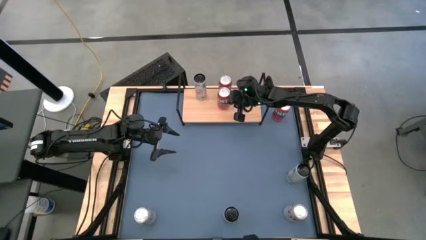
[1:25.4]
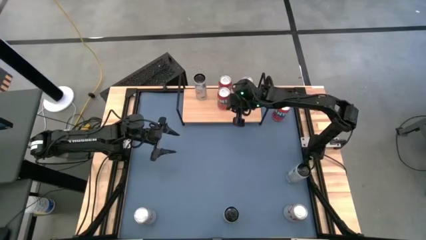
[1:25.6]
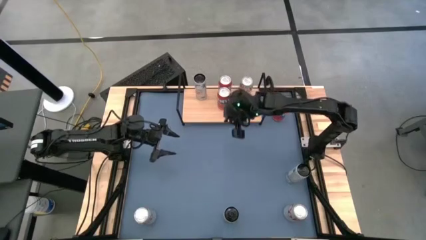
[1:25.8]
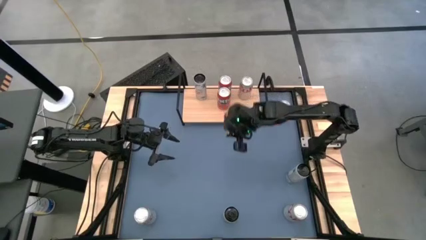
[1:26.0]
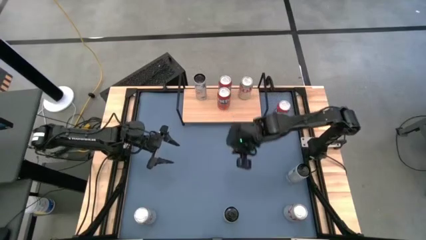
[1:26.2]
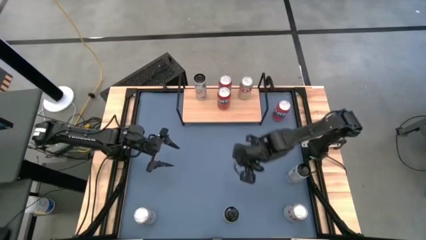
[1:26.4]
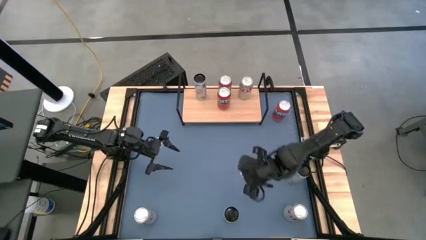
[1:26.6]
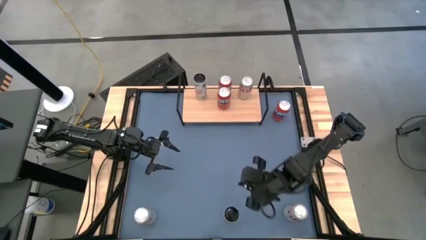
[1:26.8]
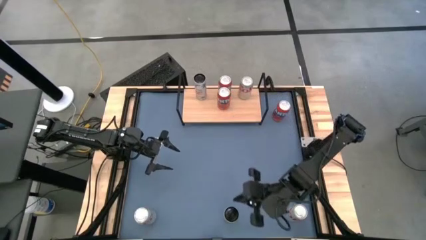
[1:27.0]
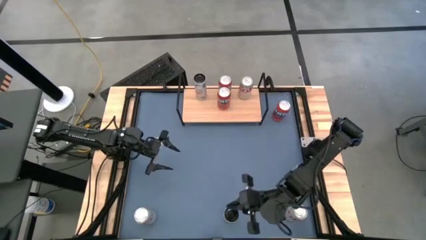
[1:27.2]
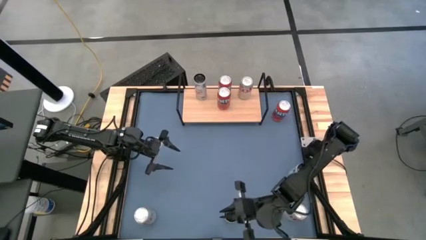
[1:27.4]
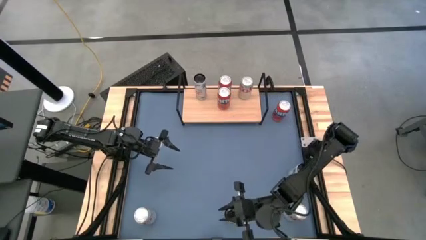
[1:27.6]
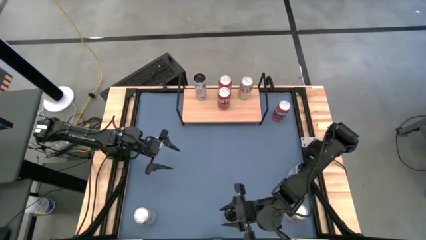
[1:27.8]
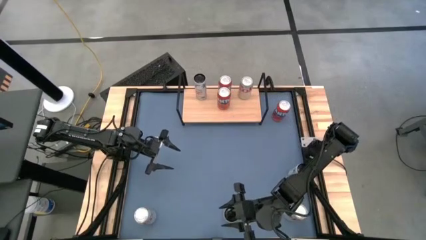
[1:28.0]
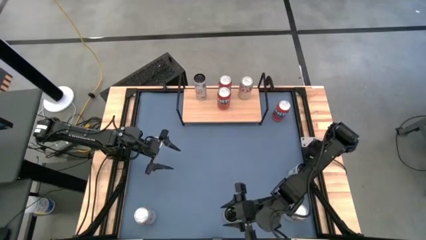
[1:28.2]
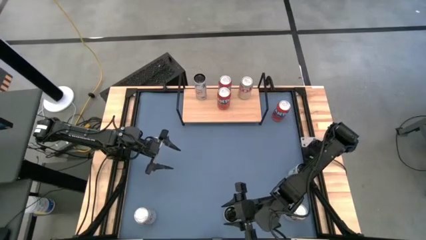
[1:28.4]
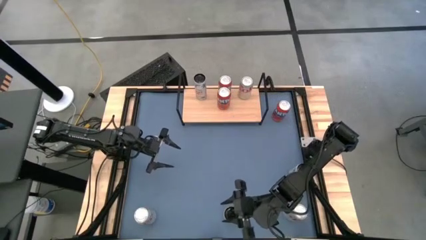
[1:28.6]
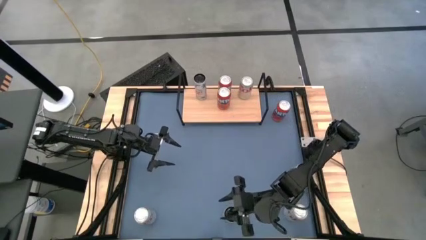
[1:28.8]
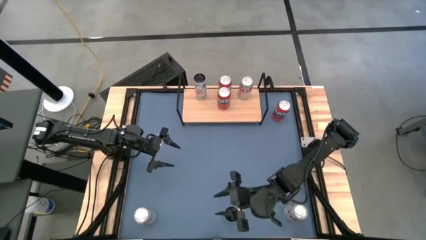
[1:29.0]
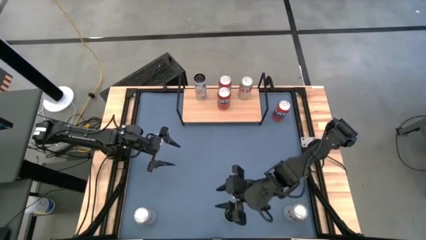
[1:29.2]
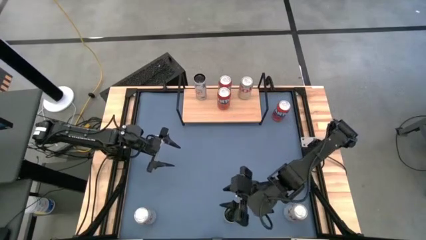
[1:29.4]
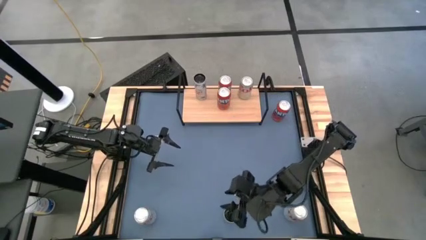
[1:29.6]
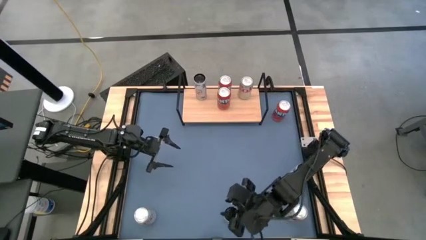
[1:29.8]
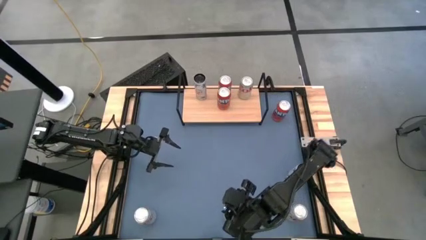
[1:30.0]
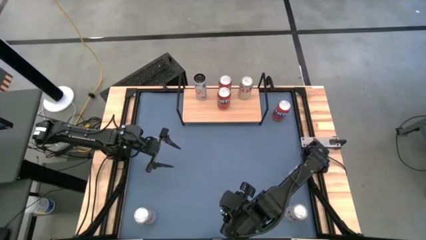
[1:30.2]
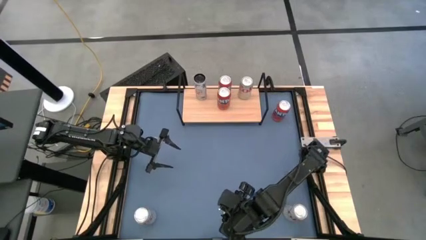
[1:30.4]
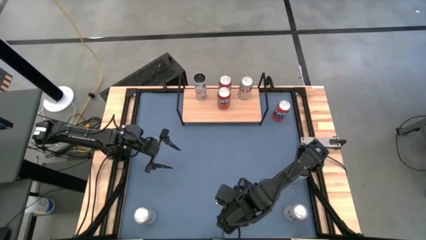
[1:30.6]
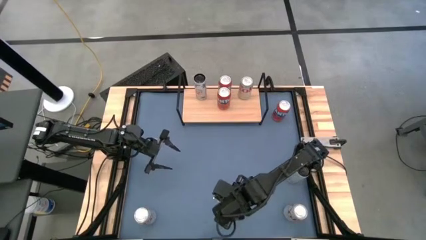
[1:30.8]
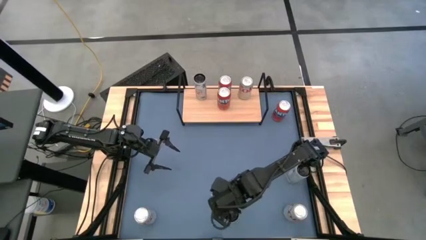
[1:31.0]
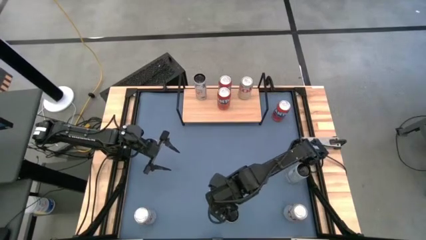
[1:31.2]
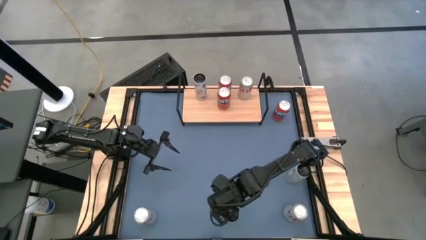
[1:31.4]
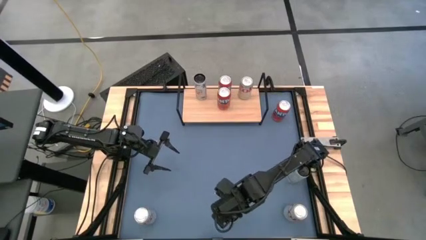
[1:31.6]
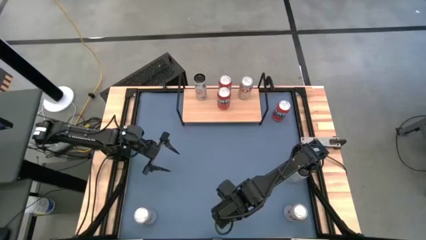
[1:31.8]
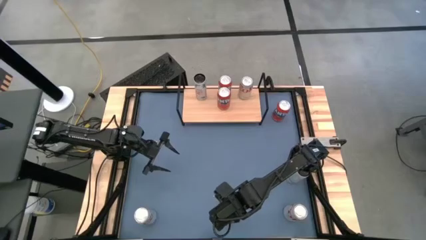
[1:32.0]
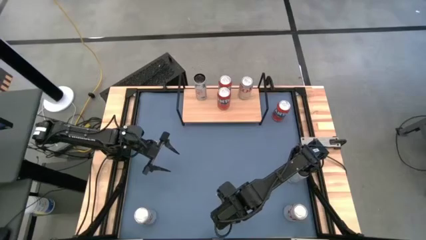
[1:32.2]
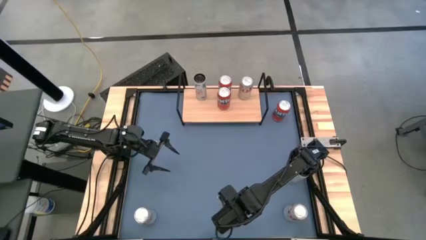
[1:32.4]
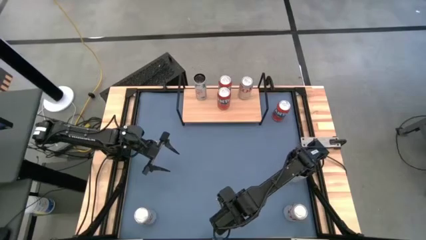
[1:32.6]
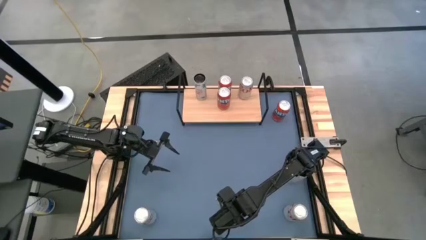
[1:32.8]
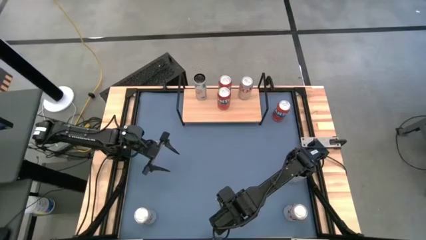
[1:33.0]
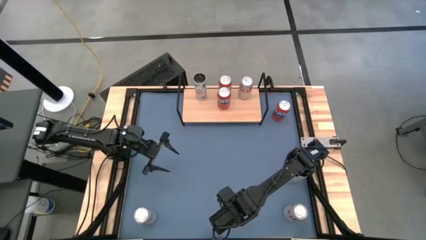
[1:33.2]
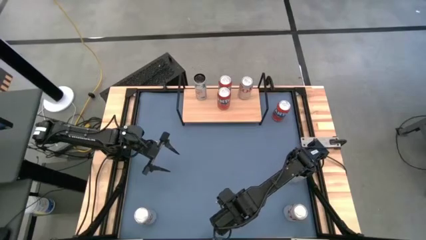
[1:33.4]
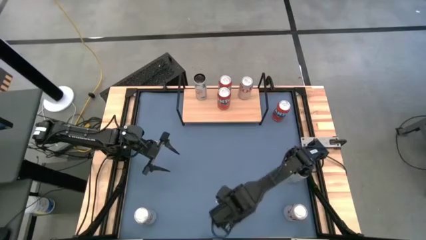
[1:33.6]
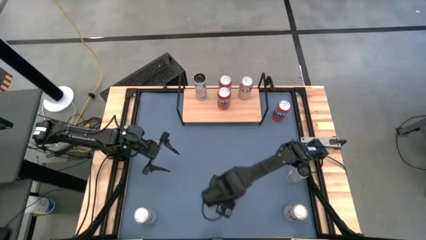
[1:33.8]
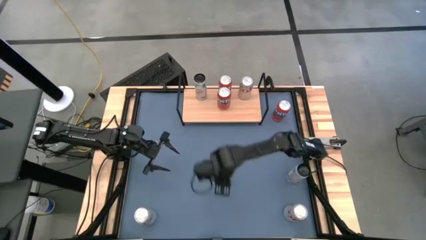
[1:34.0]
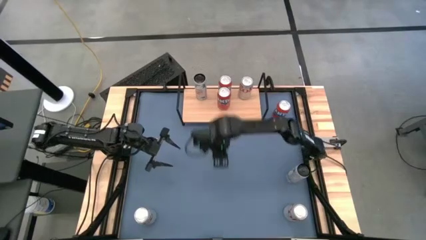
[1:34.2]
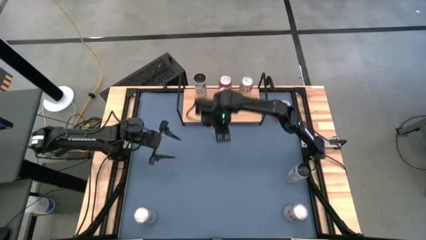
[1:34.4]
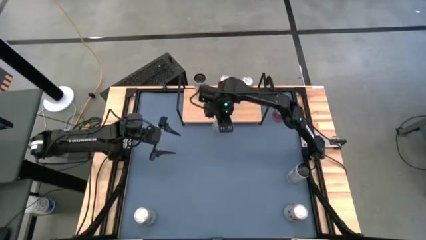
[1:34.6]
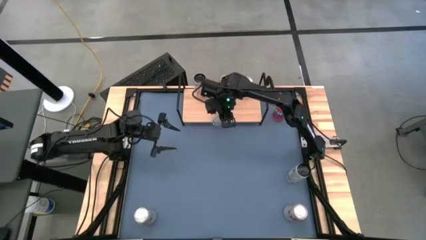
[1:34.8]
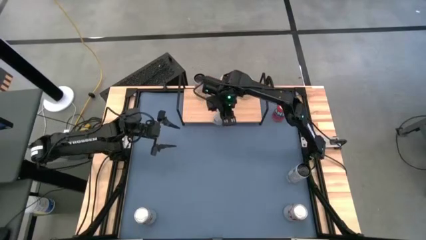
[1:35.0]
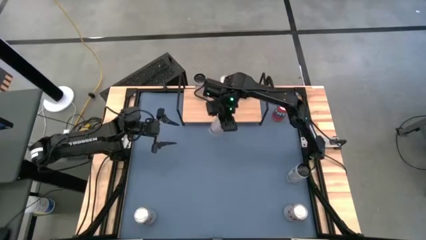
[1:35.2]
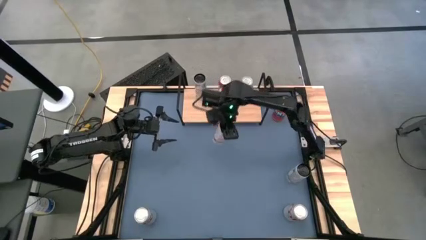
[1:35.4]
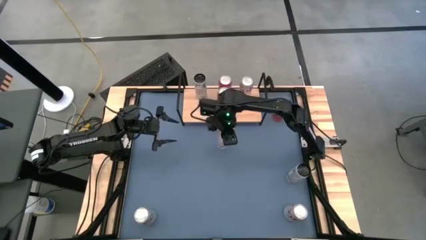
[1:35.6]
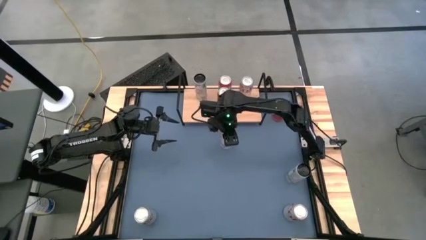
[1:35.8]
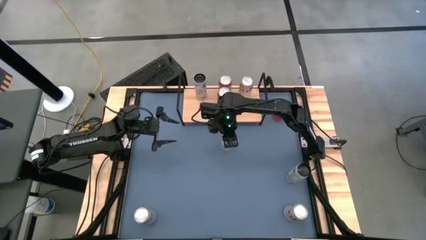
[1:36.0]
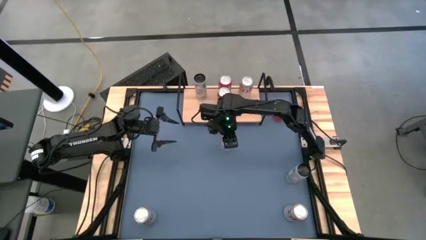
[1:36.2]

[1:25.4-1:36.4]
Task: Place canned beverage on shelf
Put the bottom black soda can on the shelf aligned with the other black soda can

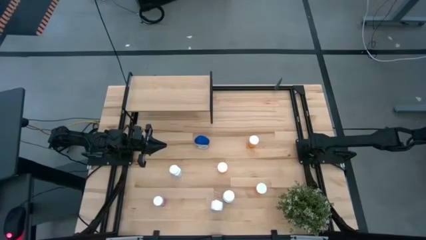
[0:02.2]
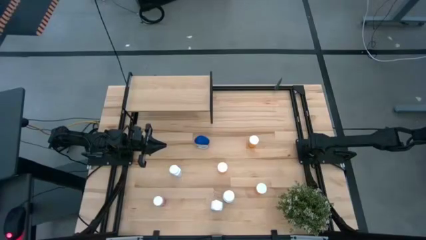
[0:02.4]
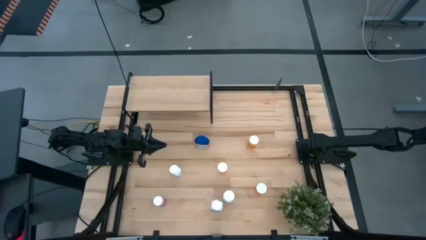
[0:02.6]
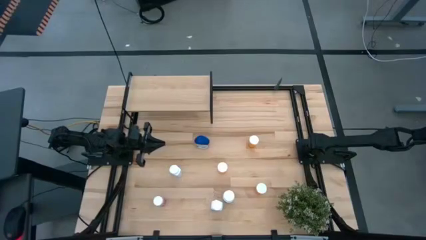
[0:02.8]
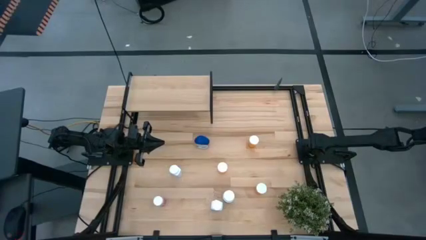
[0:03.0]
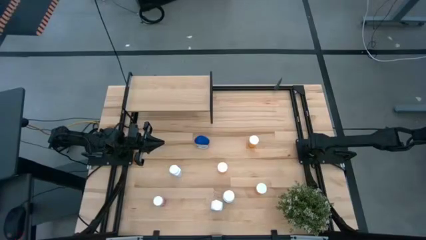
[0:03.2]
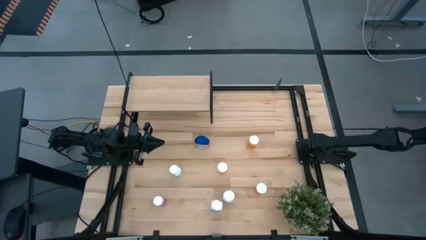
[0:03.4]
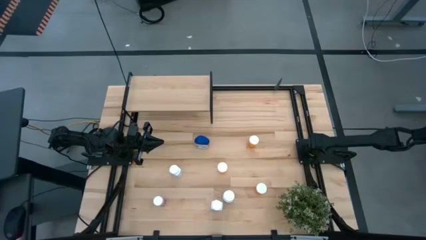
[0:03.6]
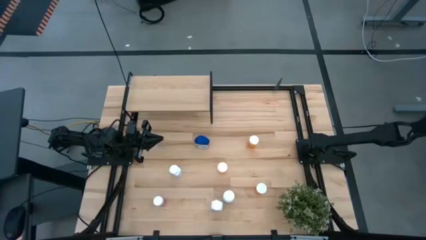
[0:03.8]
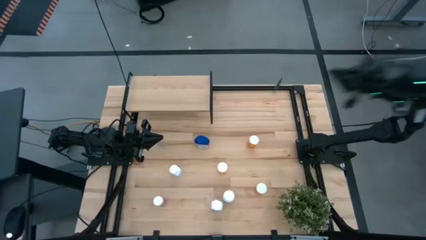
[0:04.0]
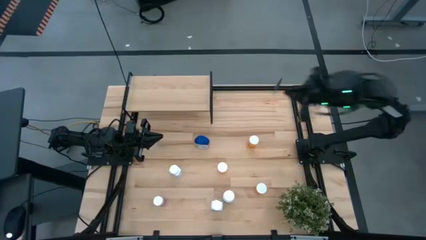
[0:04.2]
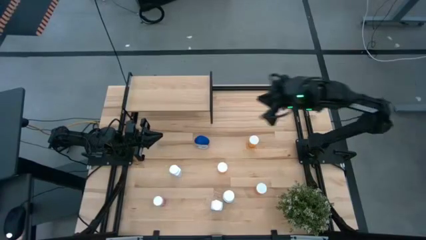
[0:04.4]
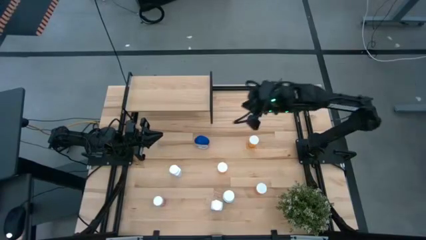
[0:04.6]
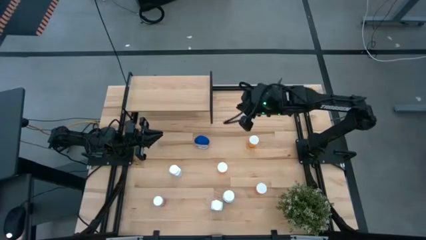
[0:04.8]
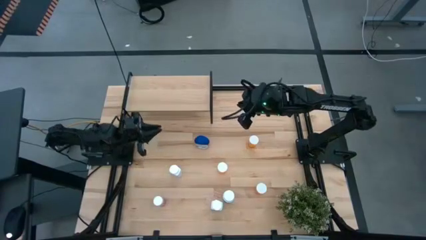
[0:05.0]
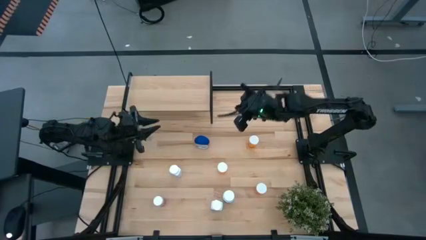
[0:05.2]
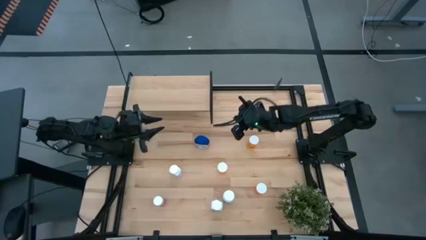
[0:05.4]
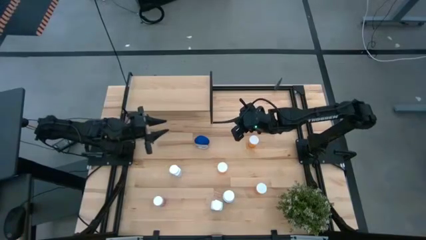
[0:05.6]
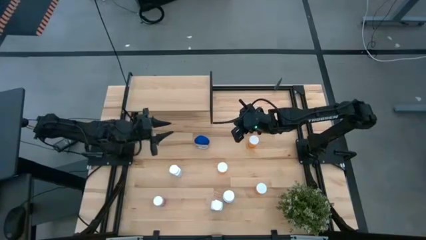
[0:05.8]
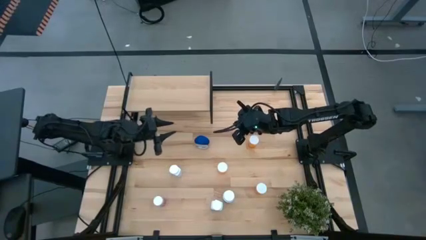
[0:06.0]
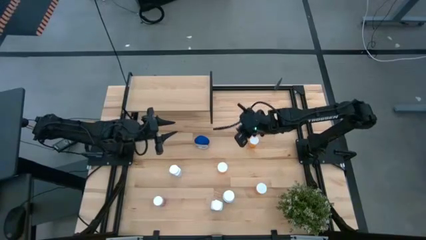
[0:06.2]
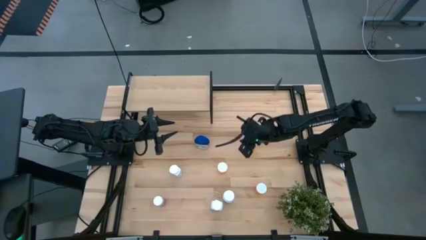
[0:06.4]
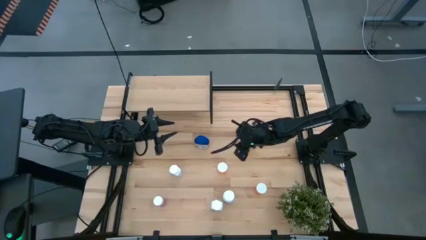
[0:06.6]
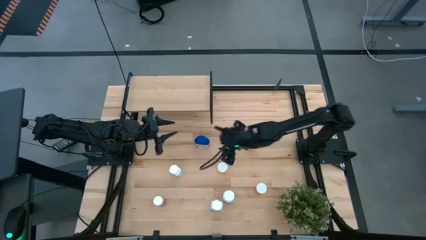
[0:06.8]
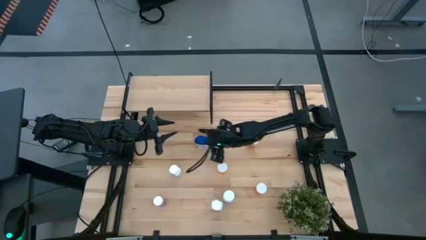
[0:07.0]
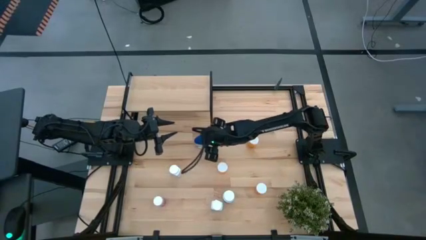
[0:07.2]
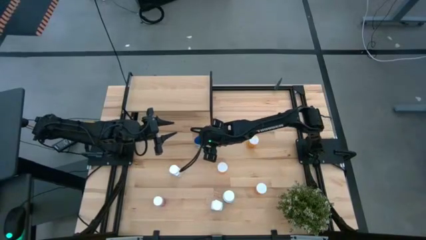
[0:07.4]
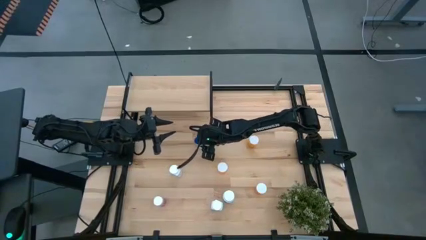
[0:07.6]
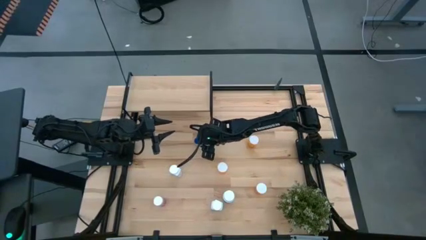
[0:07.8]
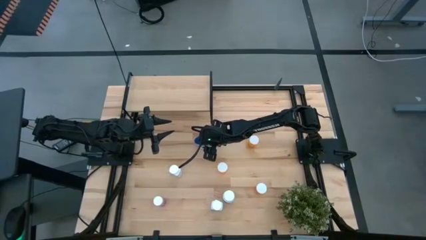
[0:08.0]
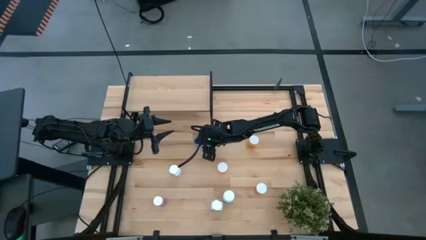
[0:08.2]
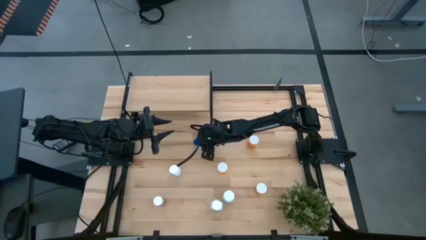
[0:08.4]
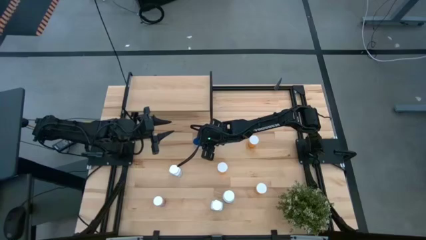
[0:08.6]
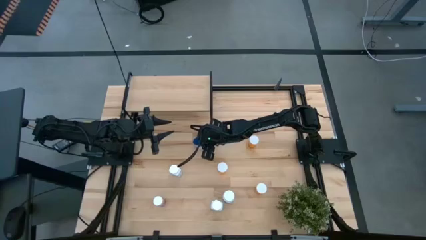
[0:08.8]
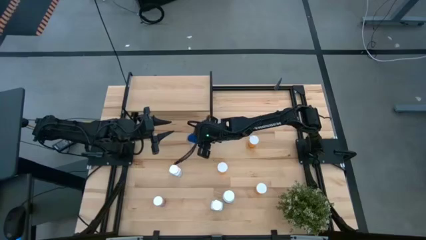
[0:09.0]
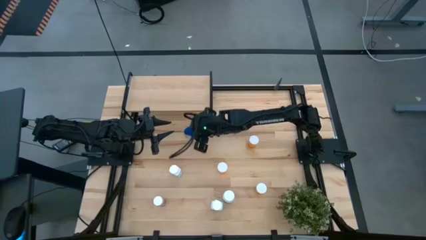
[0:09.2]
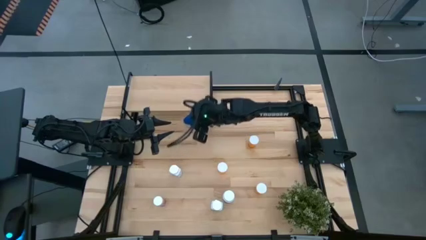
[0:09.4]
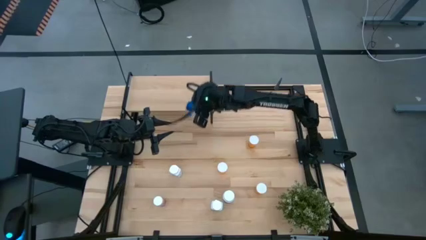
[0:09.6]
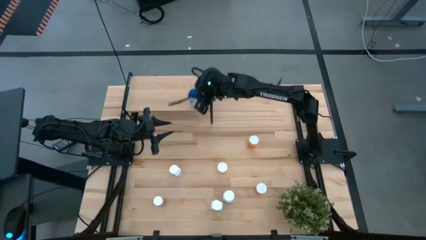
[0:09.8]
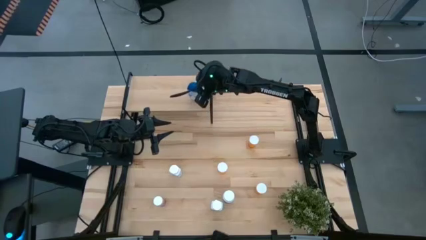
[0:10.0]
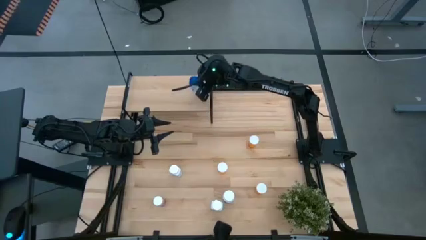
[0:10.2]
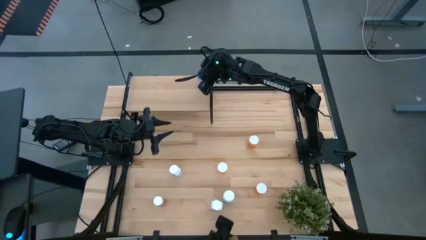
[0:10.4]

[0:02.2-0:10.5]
Task: Pick and place medicine bottles onto shelf by color
Put the blue pill bottle on the shelf
